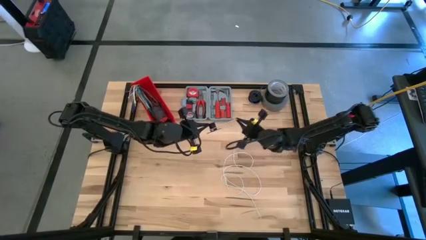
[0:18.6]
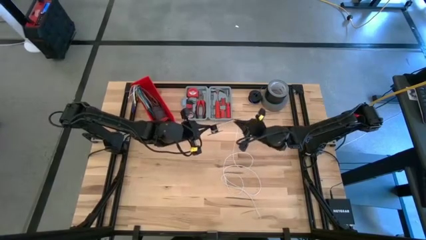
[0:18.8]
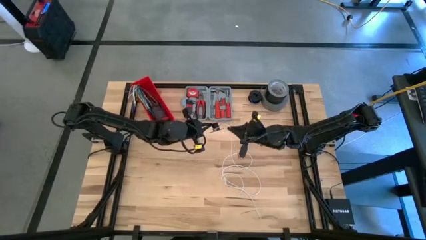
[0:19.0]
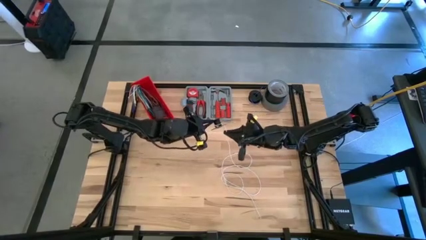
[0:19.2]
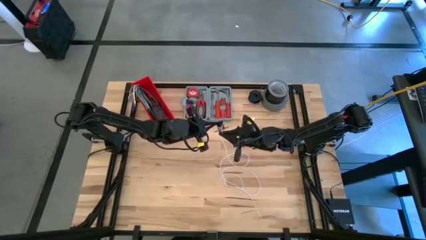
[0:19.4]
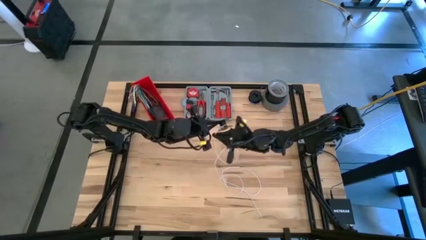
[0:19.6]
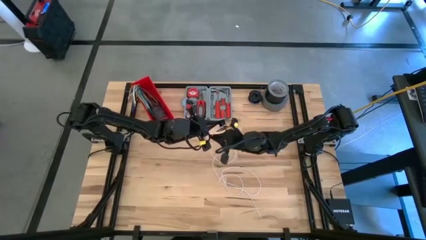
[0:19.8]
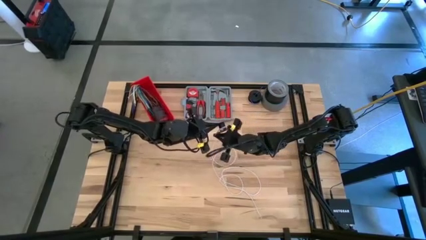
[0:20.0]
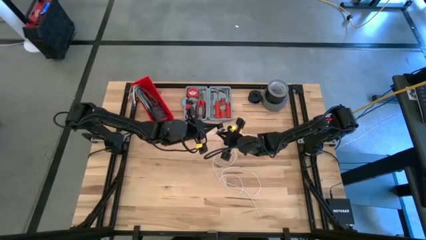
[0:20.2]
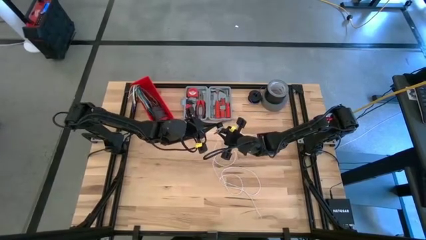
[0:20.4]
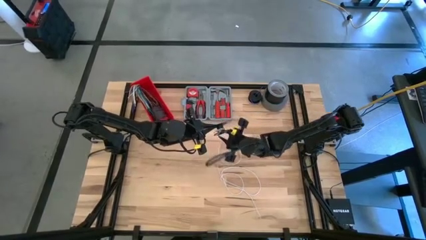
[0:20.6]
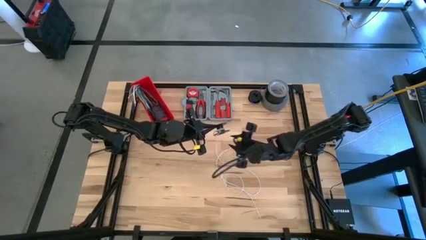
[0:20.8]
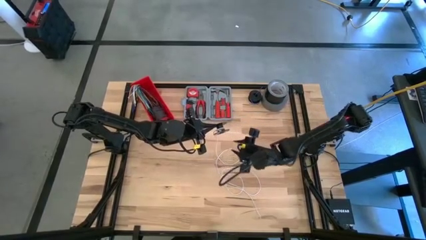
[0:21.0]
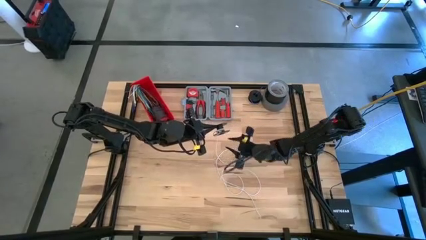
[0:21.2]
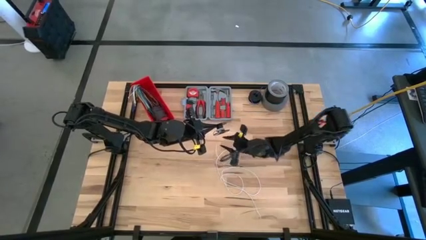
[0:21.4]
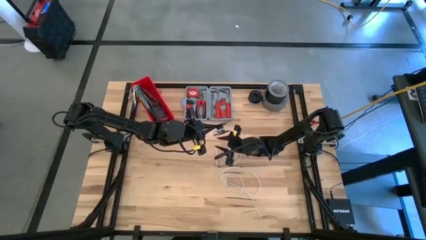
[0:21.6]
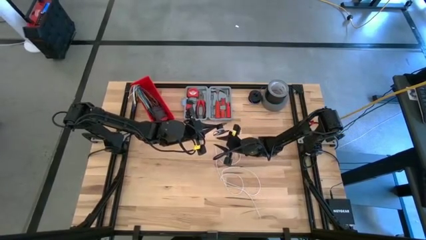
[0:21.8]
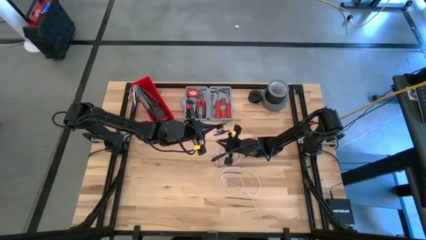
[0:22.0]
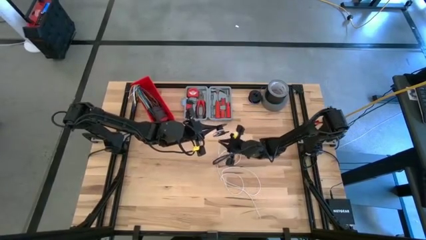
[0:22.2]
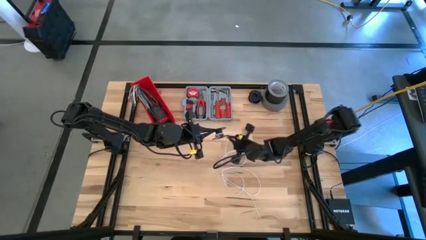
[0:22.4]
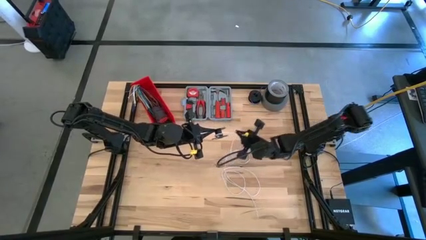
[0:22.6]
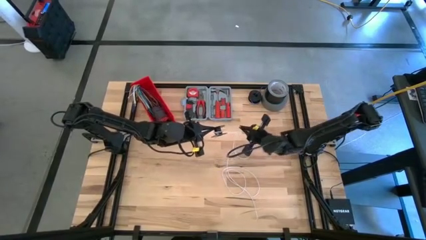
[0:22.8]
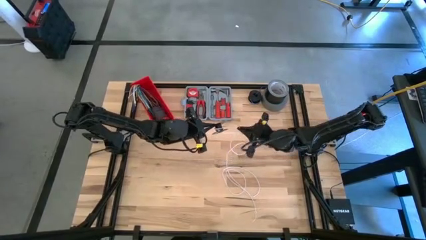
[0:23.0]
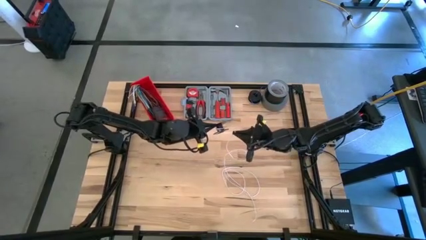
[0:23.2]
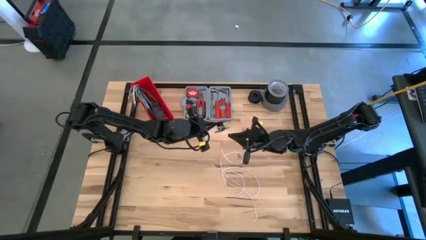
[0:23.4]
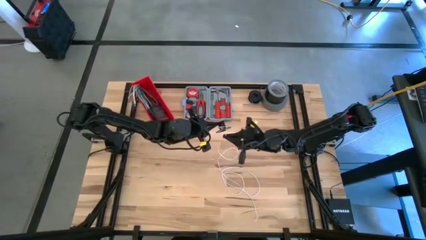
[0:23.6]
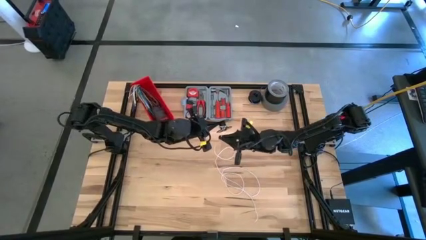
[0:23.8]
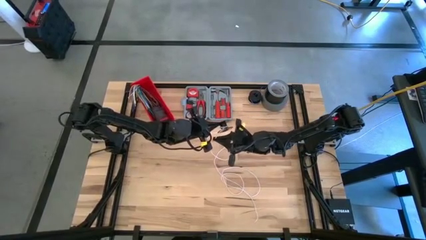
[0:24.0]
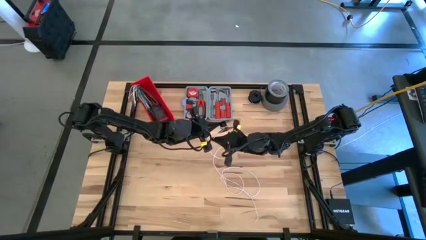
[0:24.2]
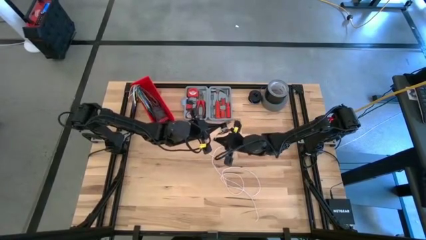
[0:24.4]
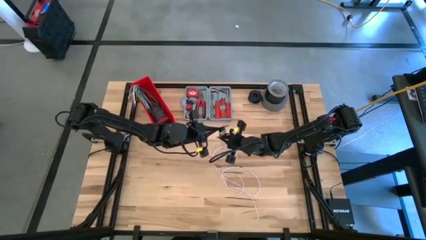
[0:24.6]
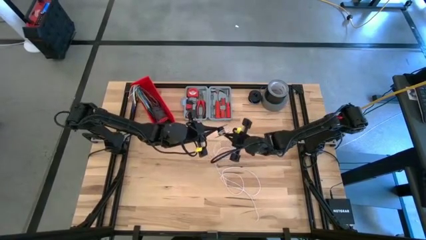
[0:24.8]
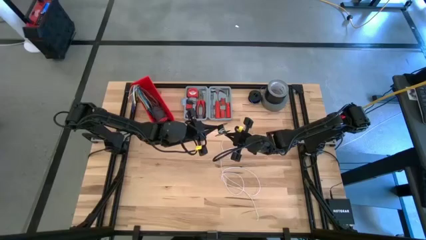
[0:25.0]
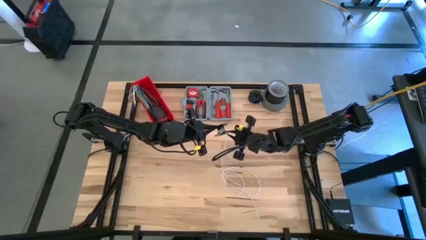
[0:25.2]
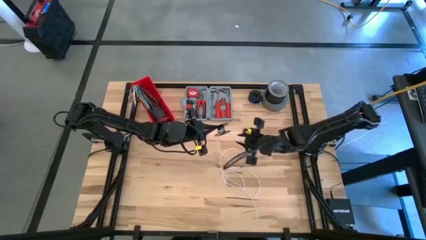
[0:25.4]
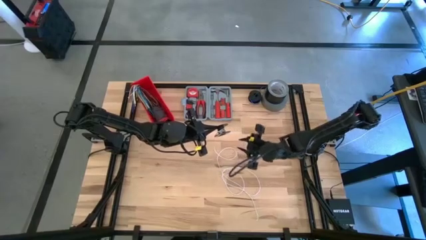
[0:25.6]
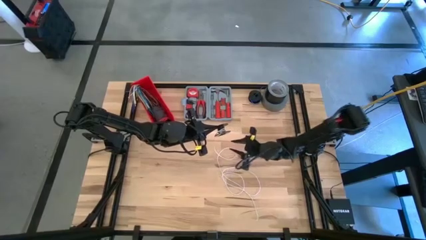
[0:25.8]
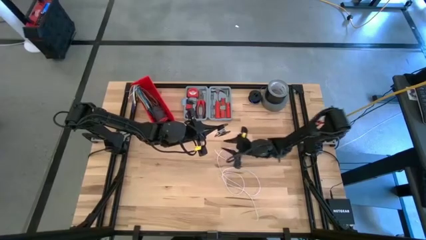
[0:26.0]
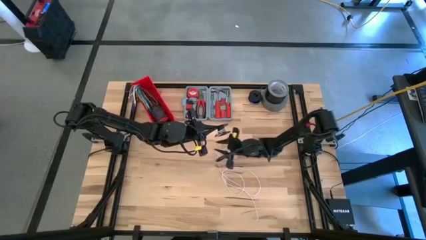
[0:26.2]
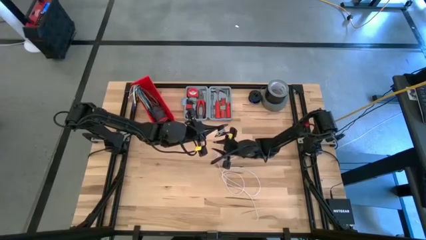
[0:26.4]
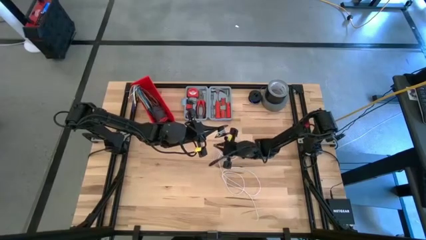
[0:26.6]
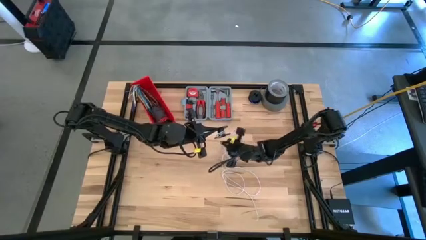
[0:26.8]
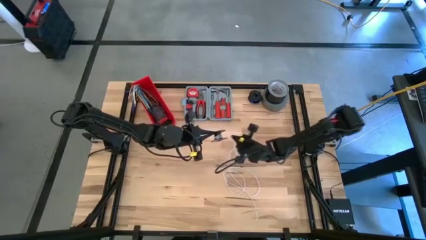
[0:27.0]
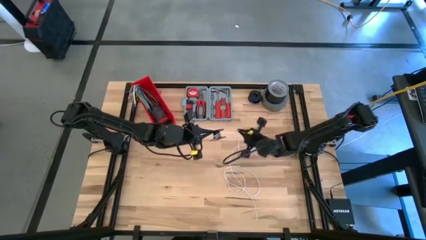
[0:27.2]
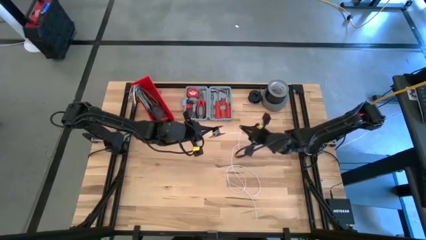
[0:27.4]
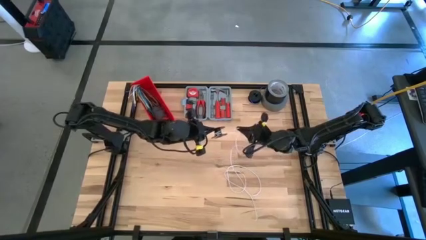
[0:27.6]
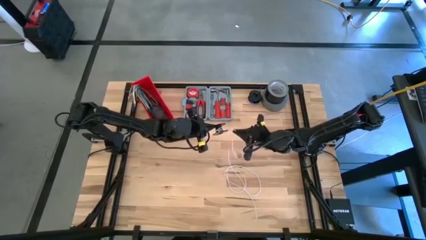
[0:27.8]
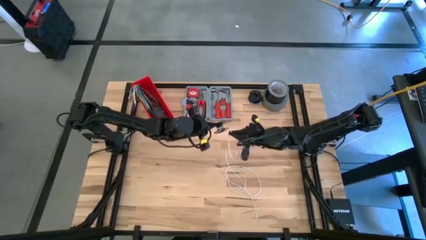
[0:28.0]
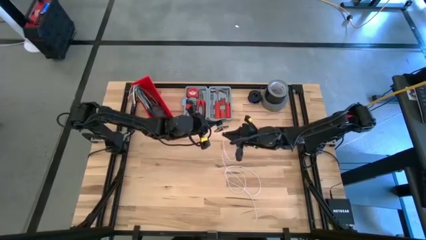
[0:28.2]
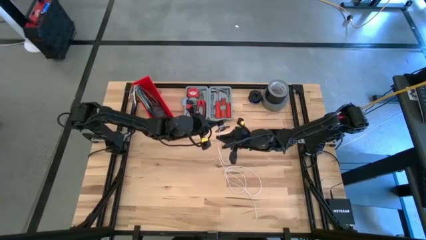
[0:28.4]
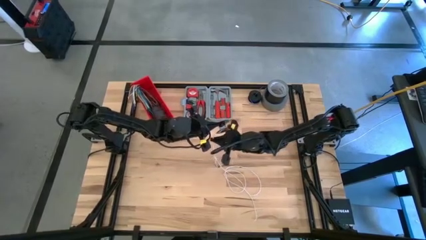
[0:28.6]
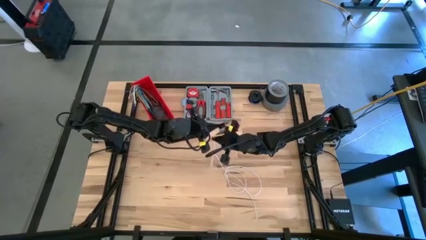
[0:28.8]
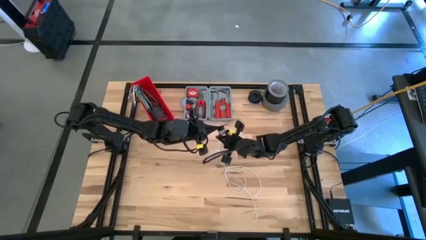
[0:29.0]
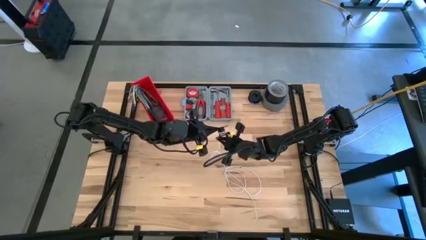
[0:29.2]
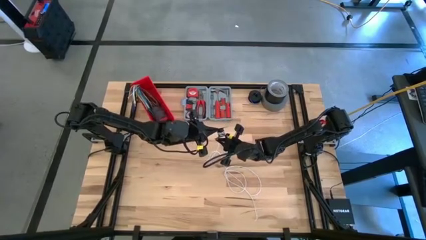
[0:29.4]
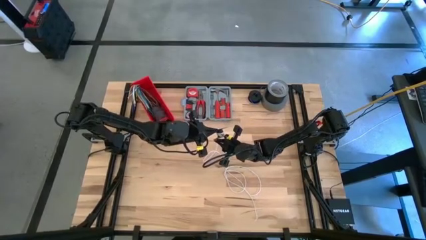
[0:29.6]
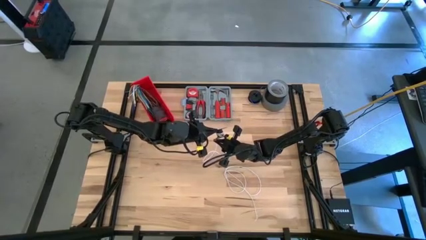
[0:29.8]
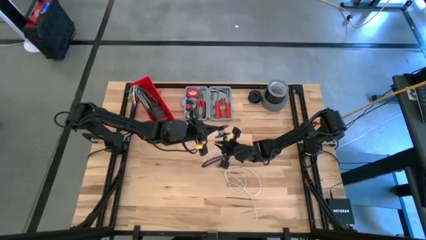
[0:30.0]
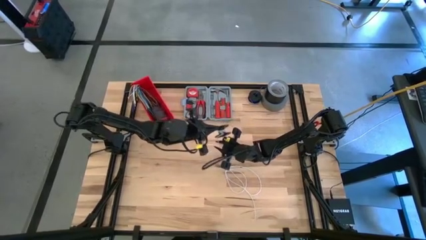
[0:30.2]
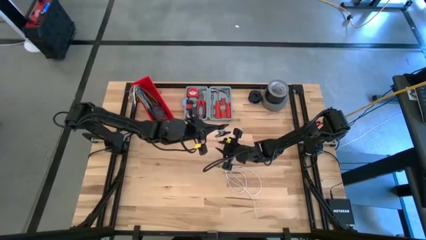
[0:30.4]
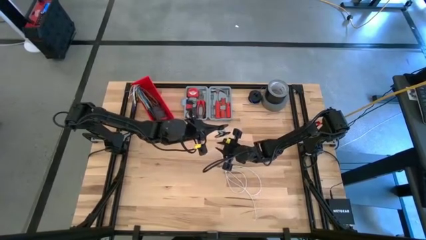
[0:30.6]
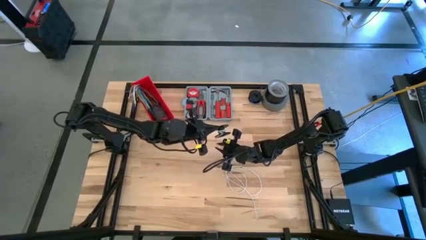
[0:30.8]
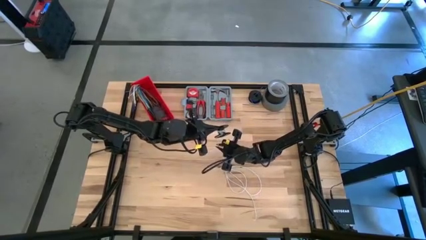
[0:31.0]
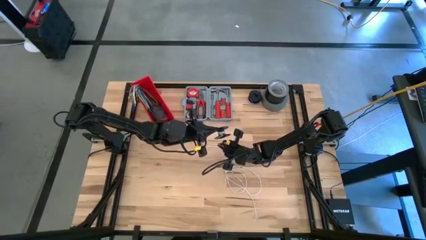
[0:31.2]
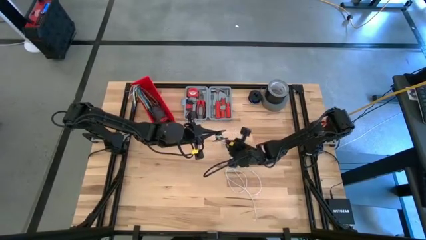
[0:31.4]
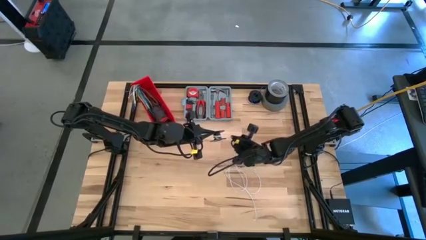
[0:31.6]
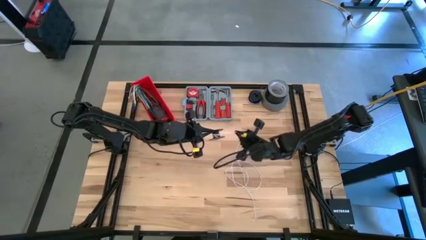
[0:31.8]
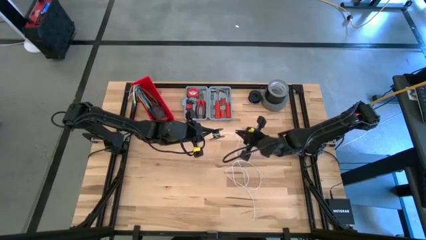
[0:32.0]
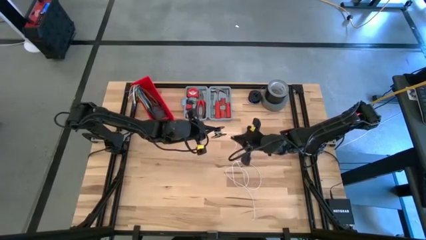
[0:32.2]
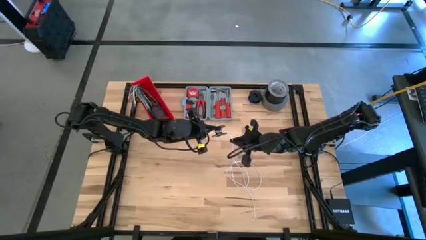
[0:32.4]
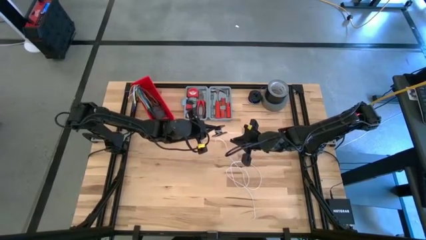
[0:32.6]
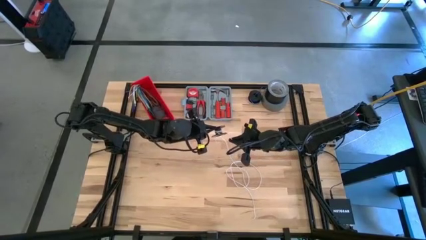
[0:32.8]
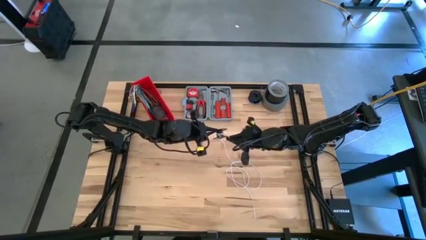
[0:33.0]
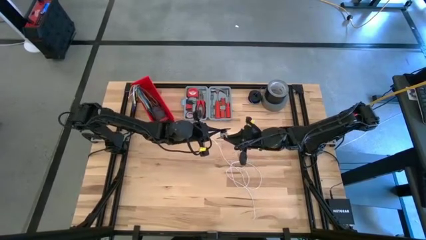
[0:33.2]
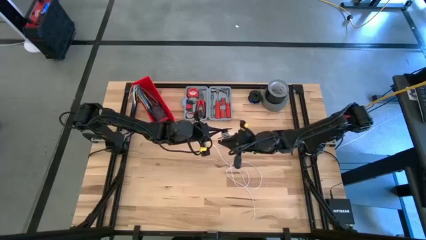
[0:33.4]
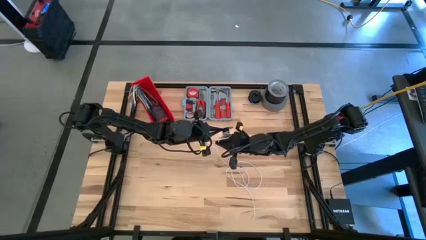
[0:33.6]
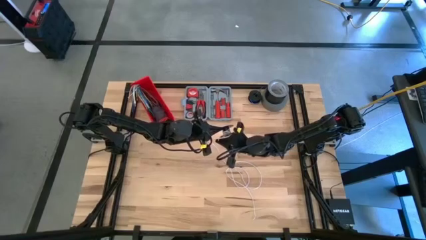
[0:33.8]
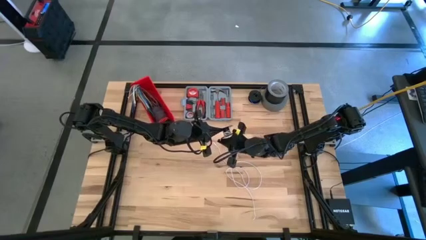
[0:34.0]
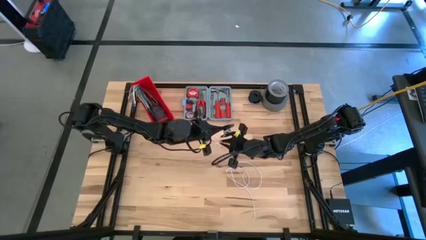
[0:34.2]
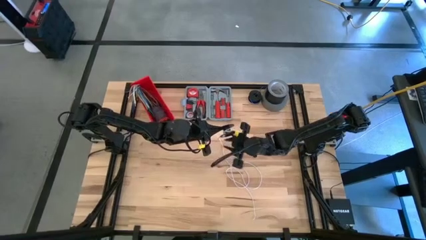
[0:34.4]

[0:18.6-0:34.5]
Task: Coil cords
Coil the white wire into the spool
